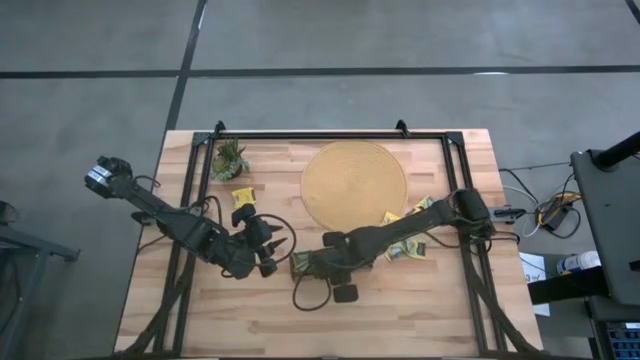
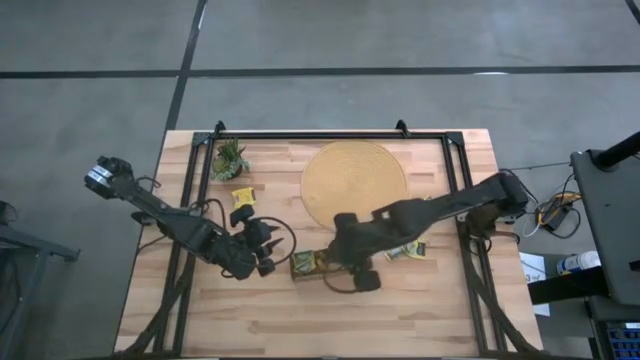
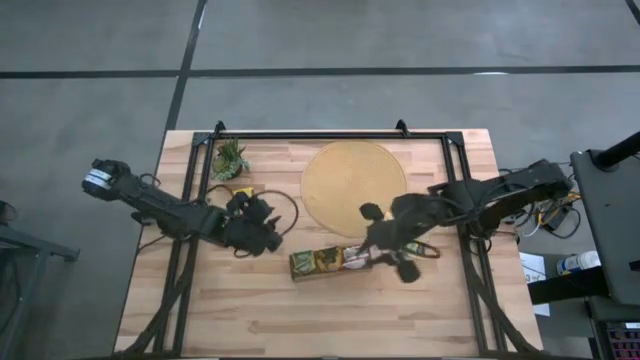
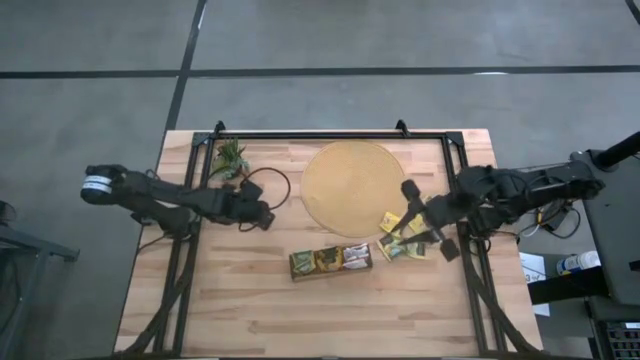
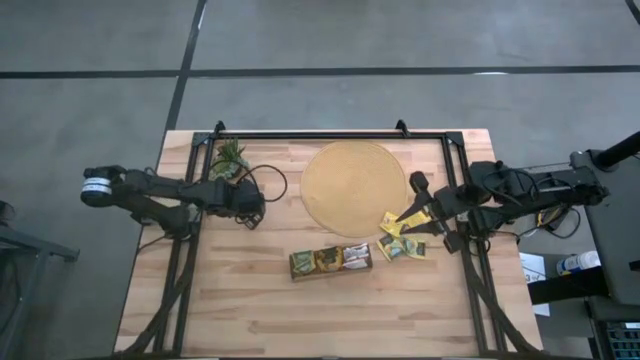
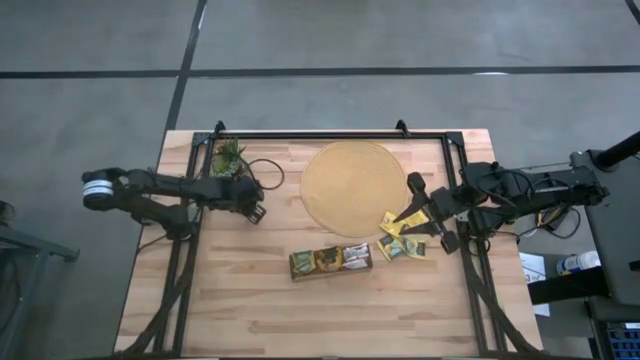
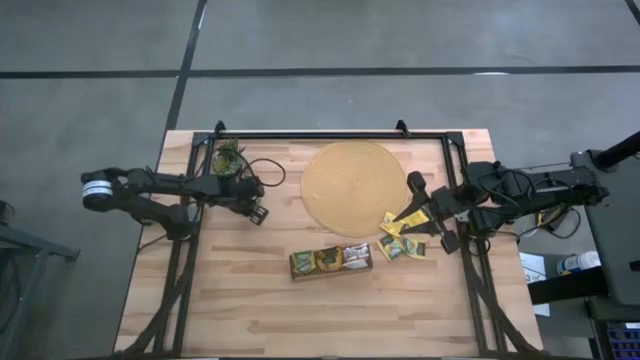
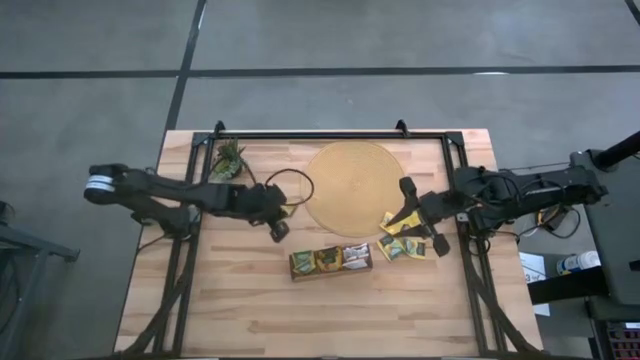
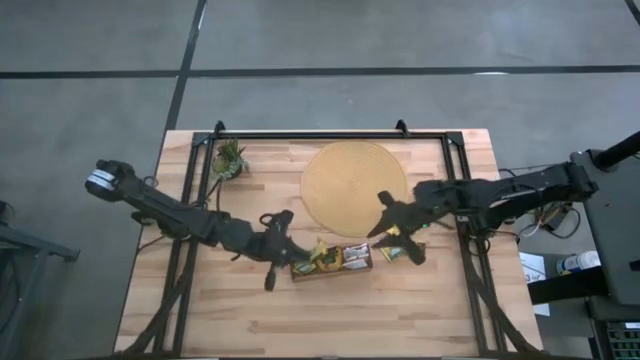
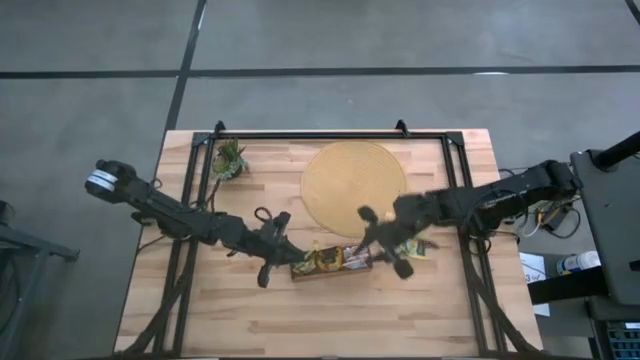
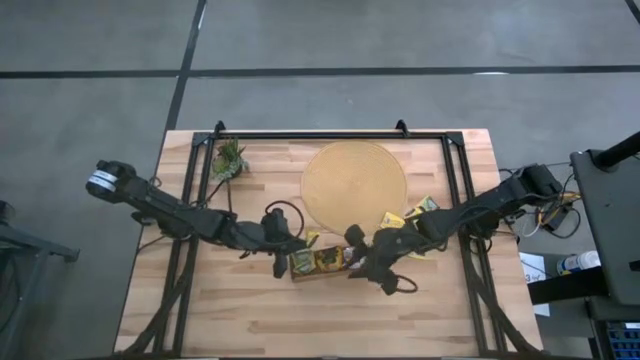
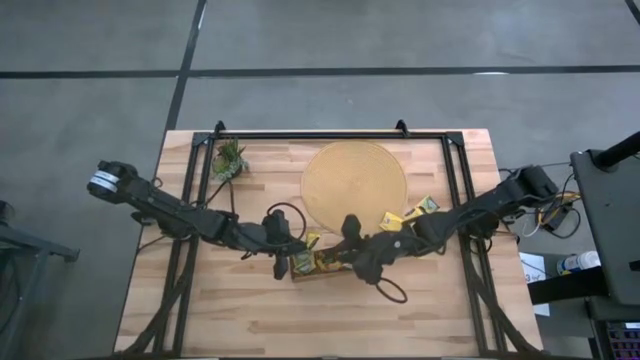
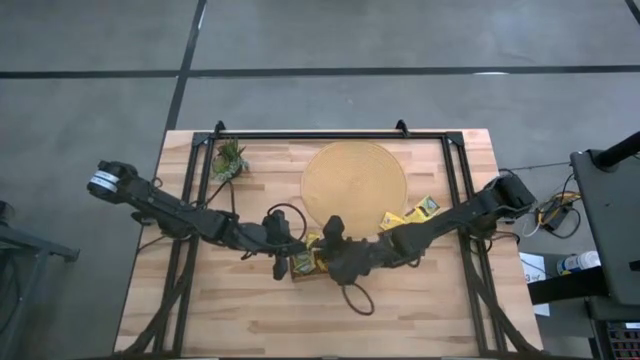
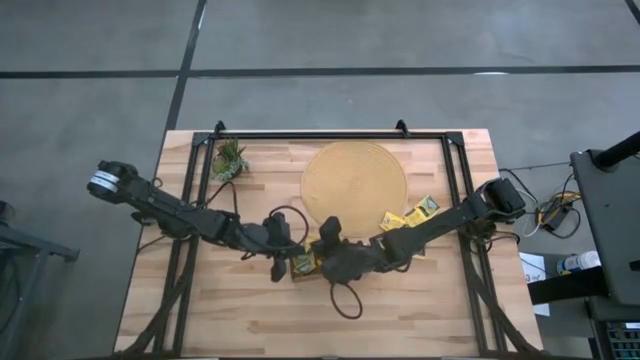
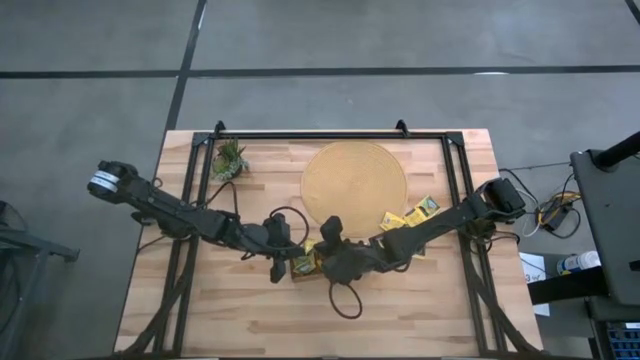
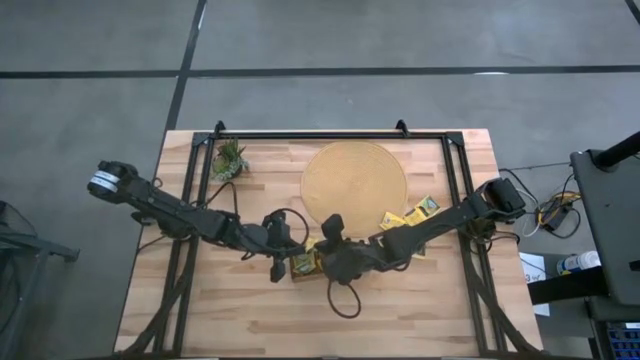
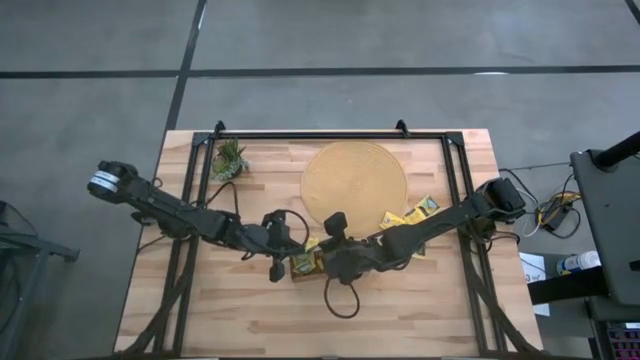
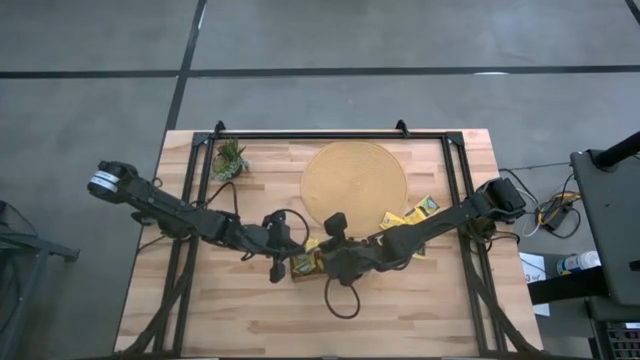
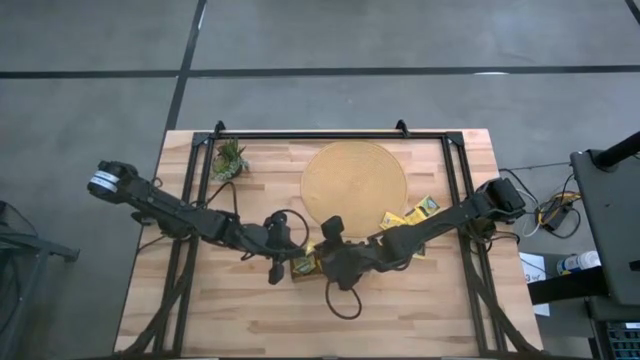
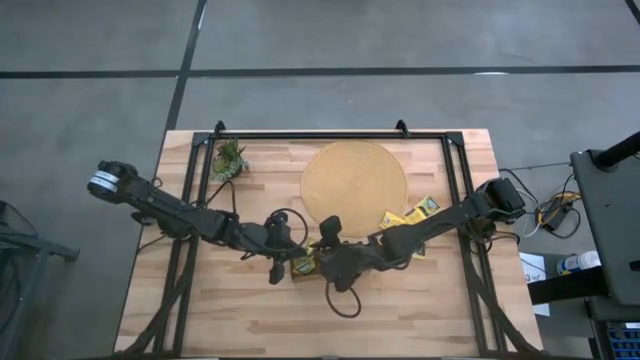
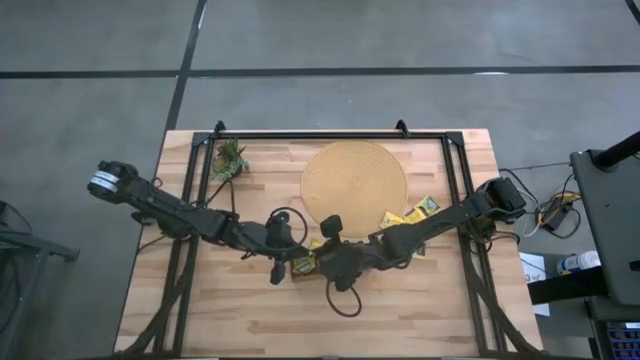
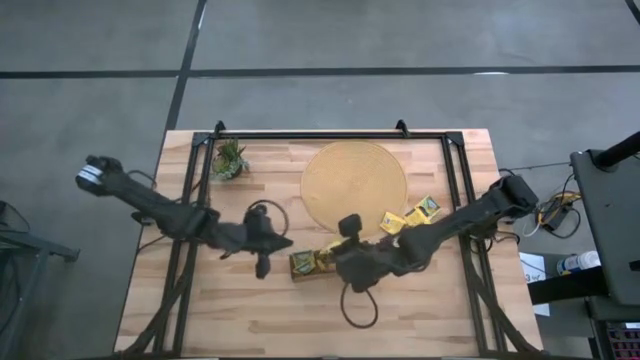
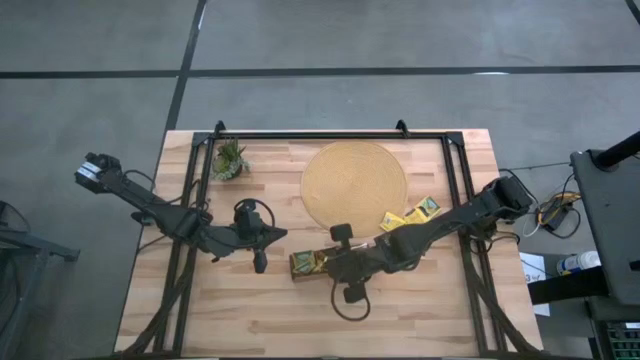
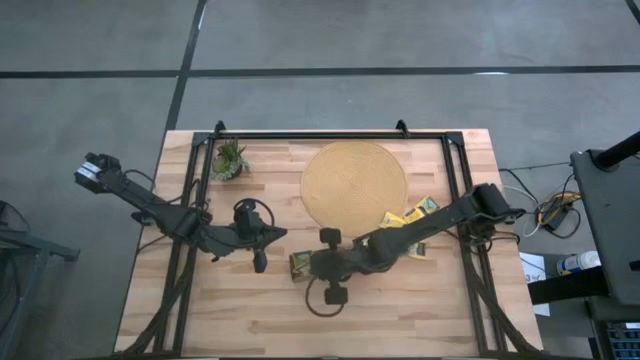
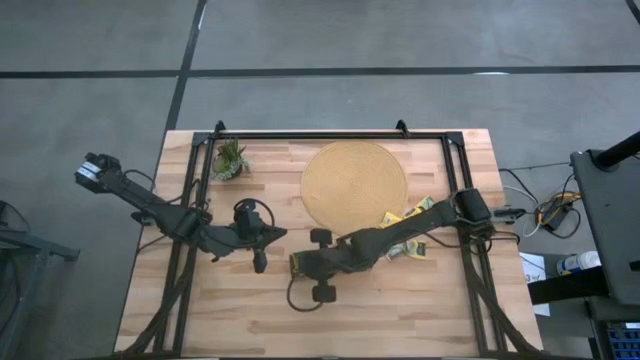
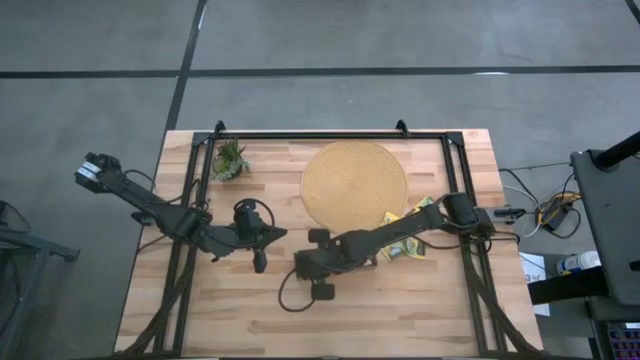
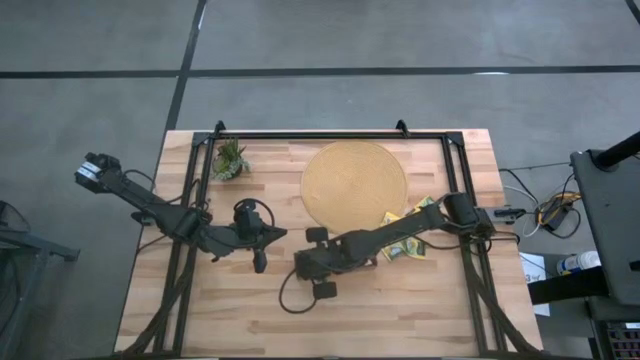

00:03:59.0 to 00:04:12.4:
Task: Pick & Place Tea
Put the yellow tea bag into the left section of the wooden organizer
